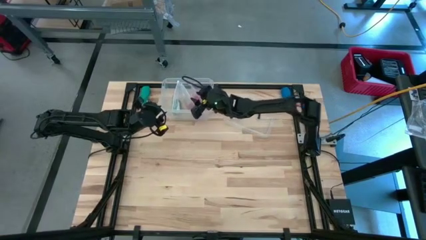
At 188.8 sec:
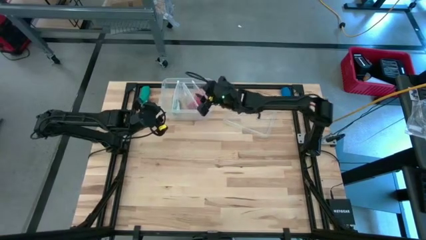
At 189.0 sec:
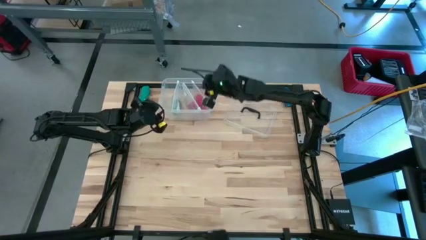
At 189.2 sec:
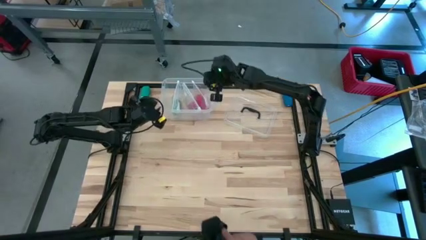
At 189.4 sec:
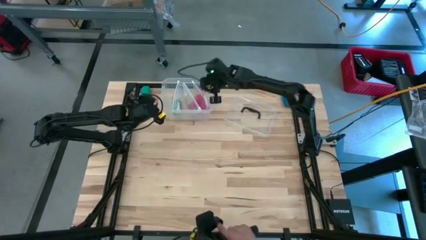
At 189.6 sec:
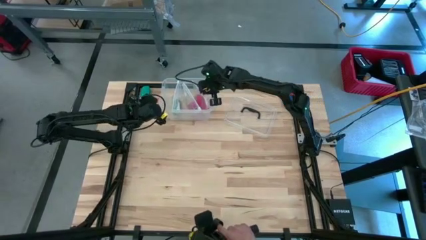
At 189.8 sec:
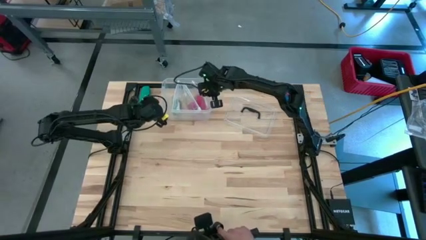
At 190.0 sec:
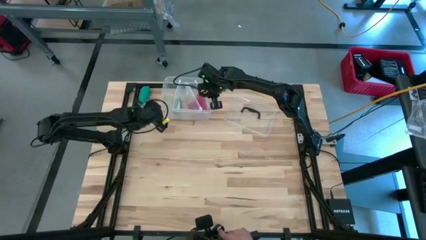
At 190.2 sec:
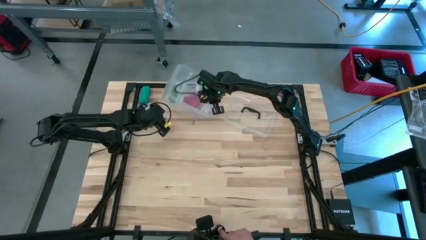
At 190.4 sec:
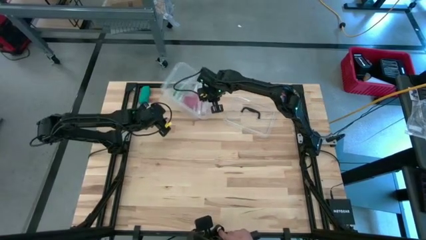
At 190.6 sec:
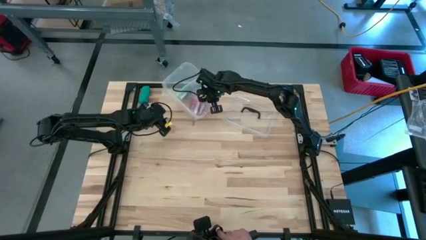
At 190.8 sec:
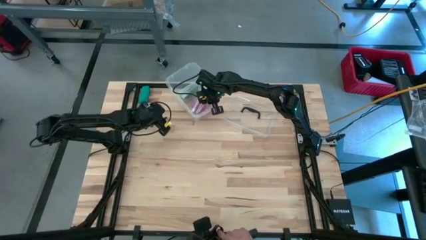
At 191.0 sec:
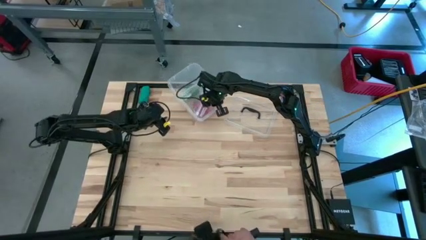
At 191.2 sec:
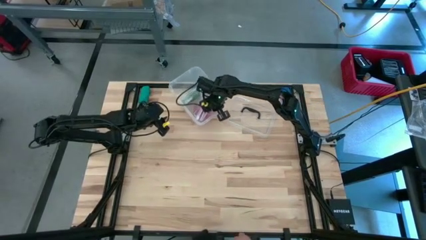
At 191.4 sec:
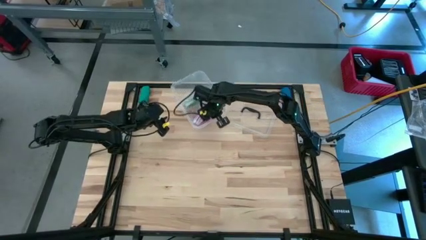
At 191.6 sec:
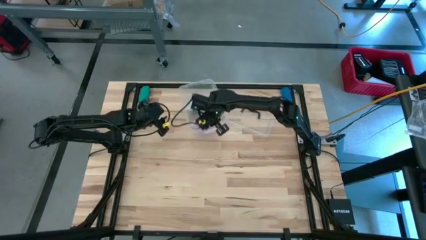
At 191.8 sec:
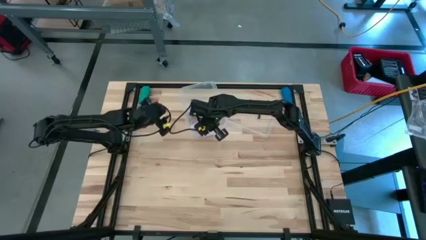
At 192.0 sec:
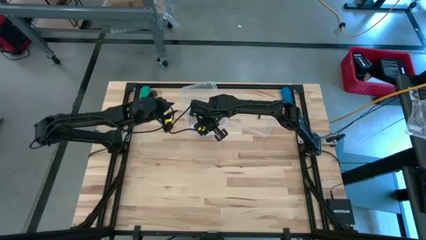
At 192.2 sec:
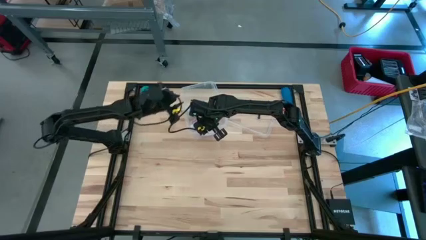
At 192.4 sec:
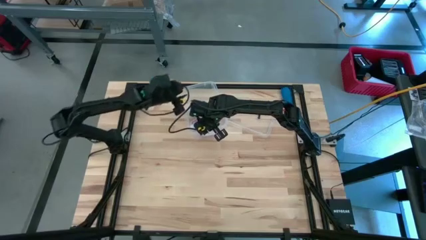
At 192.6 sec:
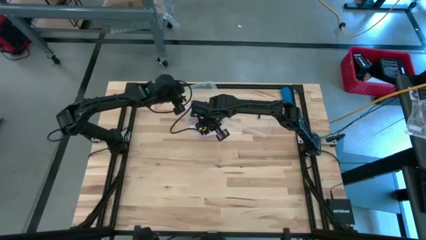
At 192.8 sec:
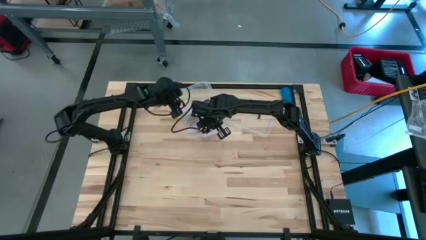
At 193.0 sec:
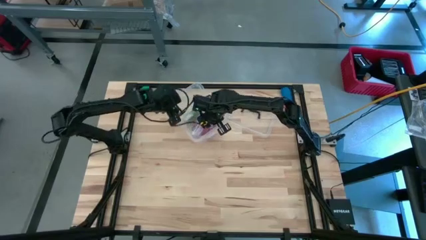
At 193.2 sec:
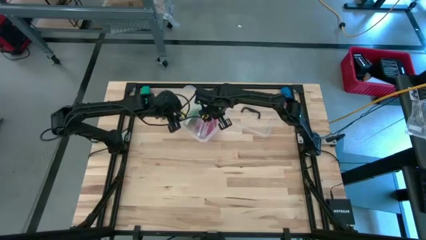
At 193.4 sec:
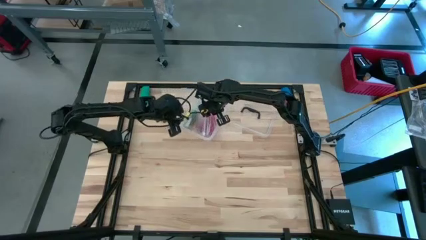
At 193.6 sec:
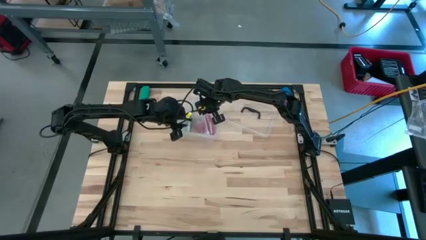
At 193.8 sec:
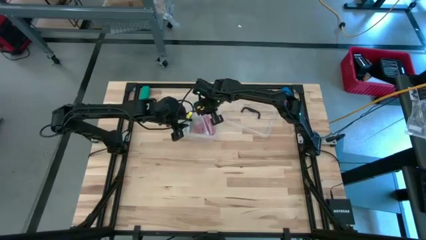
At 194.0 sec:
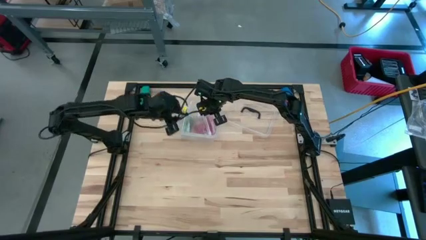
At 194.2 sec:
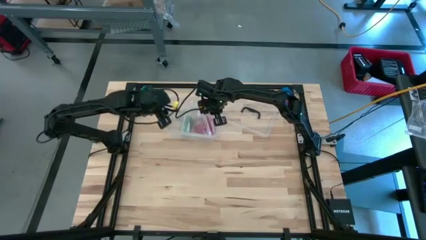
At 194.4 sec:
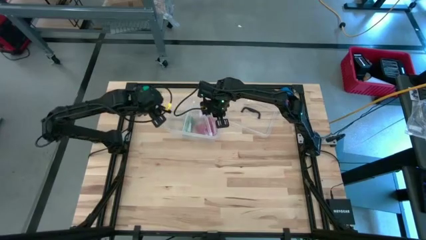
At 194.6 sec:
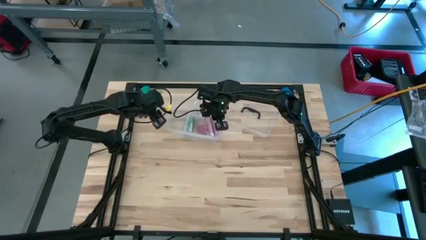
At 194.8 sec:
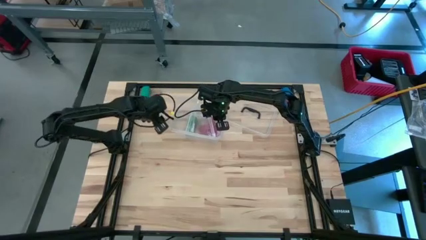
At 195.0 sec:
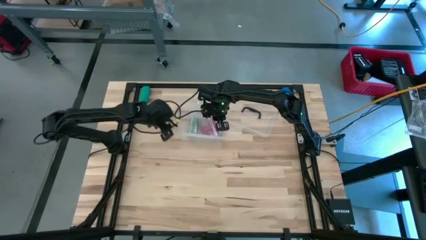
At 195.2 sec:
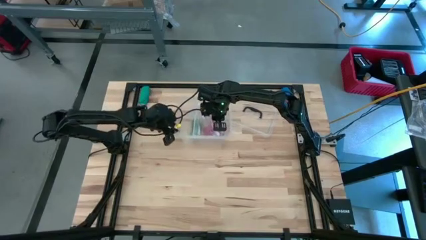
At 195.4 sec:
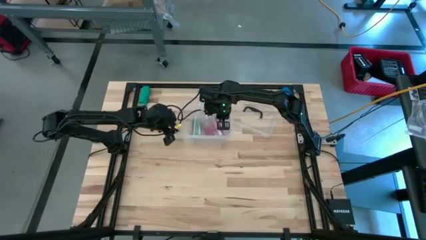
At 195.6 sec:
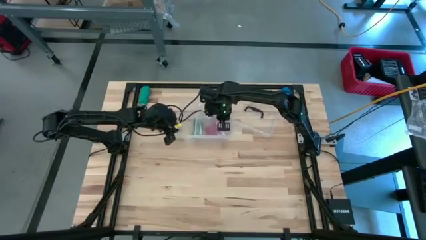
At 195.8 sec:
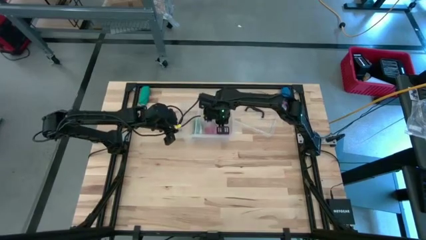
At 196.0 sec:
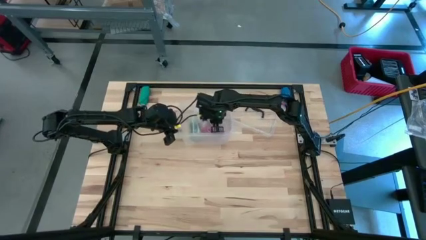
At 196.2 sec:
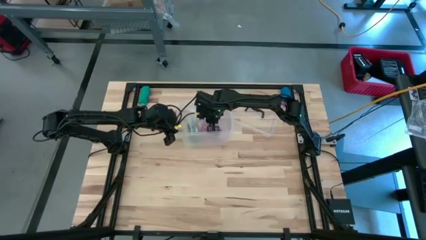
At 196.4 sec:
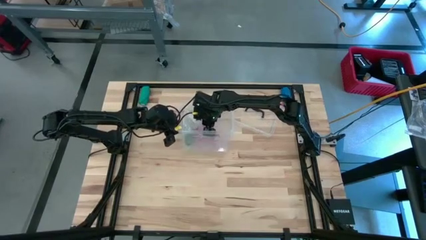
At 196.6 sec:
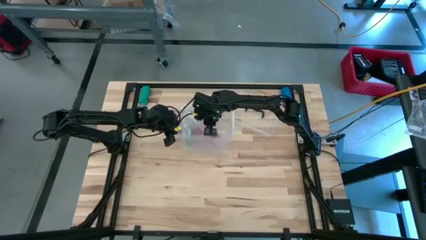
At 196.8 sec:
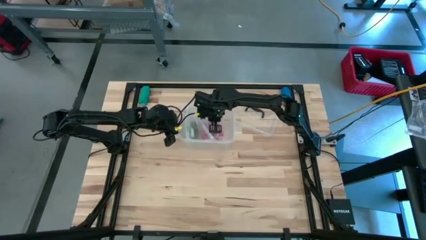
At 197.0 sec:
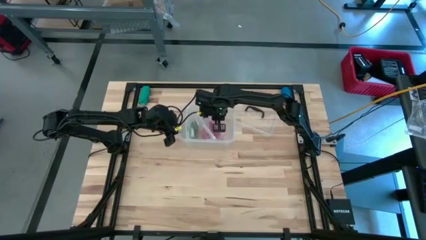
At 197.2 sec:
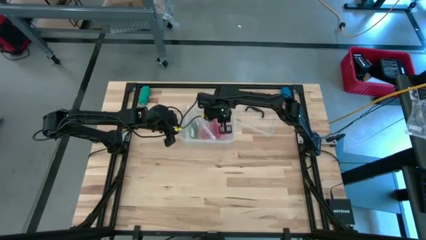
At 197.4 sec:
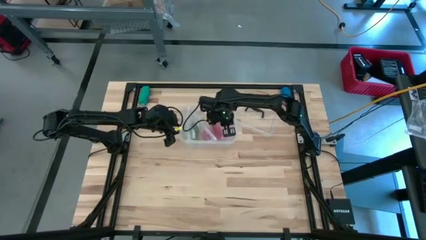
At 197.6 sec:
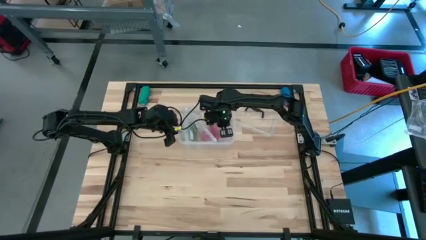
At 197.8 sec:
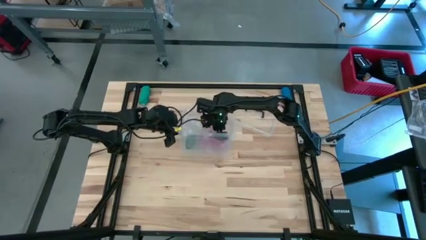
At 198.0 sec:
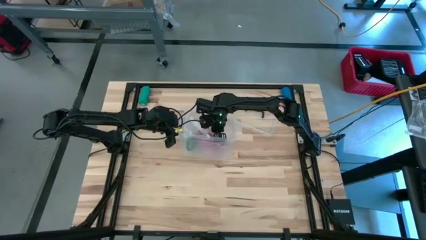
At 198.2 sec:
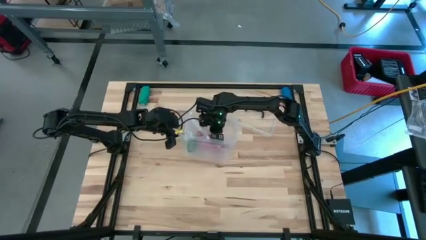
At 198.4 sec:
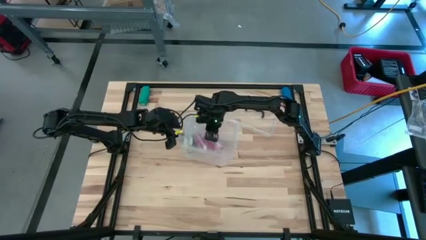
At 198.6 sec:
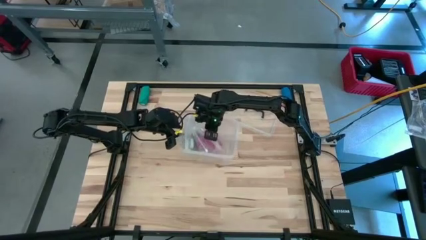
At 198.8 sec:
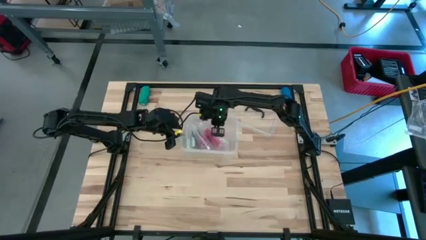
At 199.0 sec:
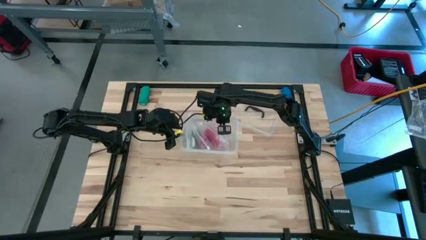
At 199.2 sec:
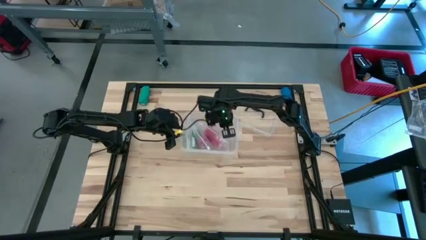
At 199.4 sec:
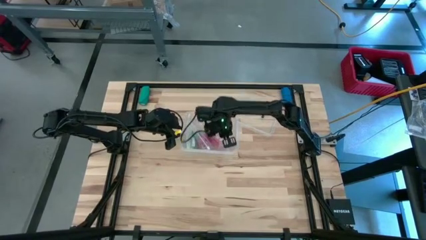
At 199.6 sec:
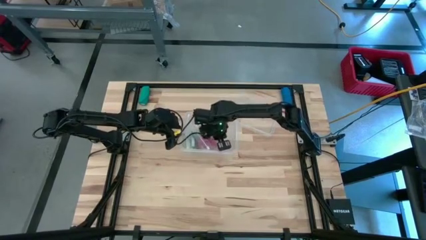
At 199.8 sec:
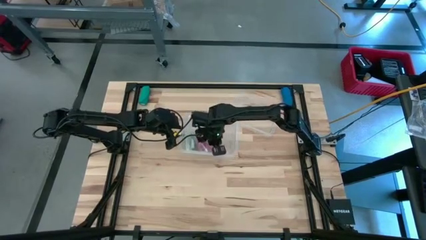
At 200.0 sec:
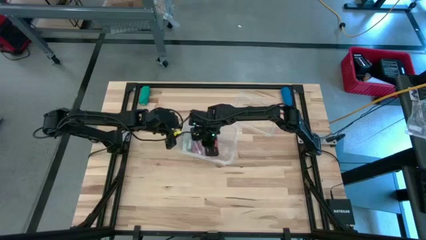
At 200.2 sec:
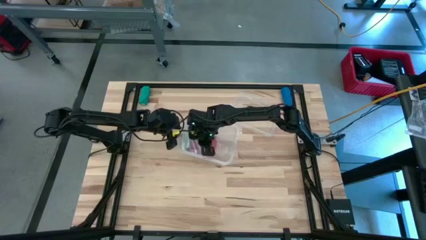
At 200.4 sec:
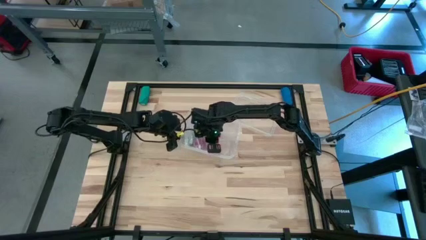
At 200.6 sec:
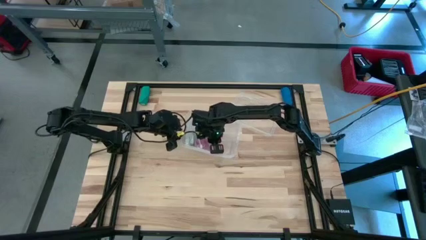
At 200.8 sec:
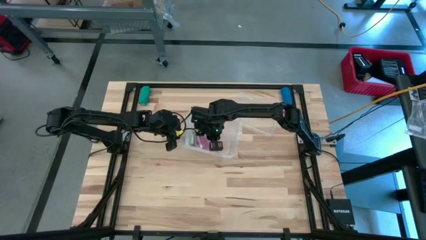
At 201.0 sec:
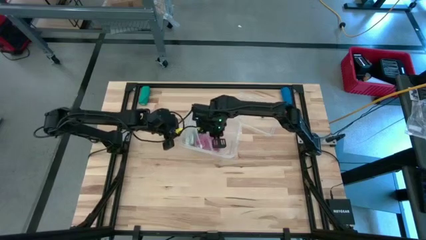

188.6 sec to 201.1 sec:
Task: Roll bandage
Adjust the zip bags in the transparent container
